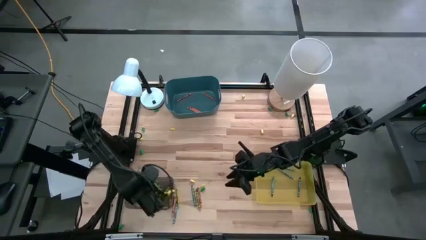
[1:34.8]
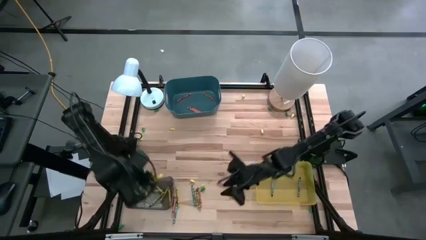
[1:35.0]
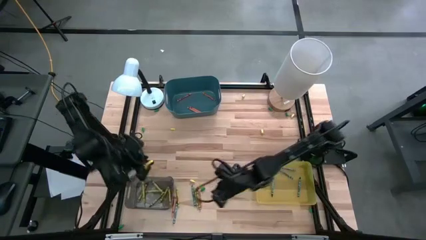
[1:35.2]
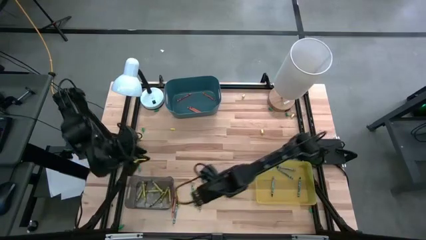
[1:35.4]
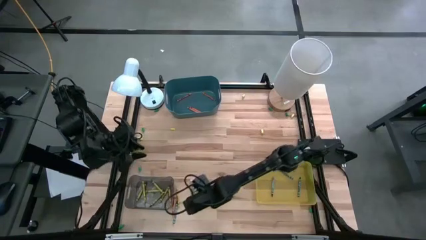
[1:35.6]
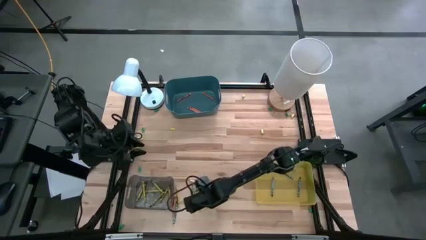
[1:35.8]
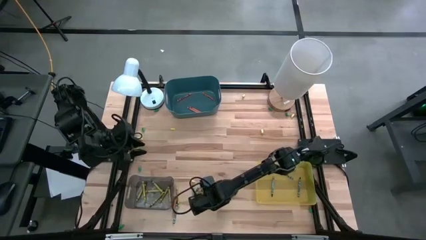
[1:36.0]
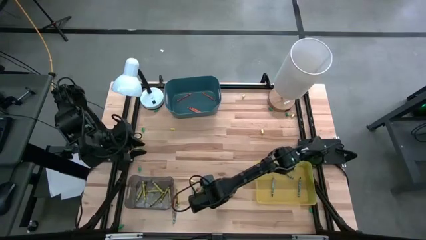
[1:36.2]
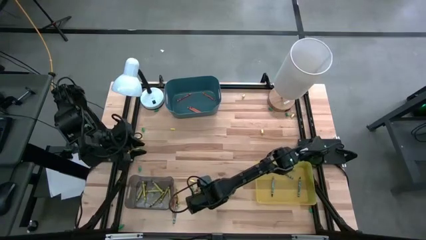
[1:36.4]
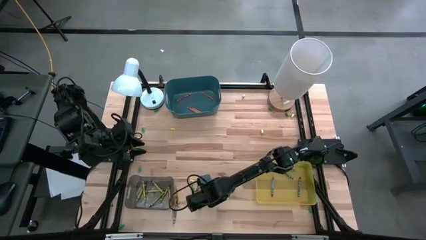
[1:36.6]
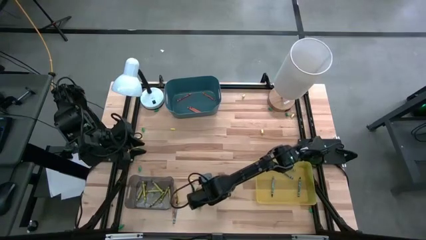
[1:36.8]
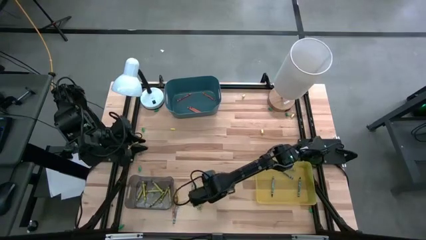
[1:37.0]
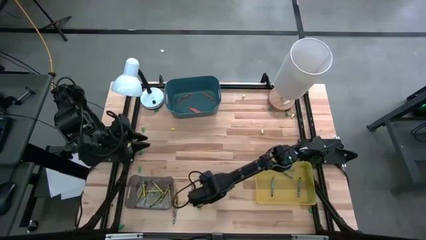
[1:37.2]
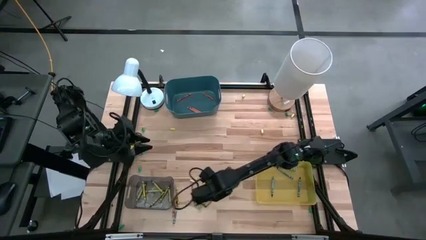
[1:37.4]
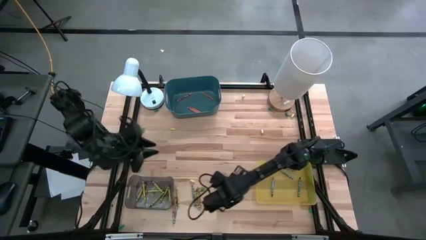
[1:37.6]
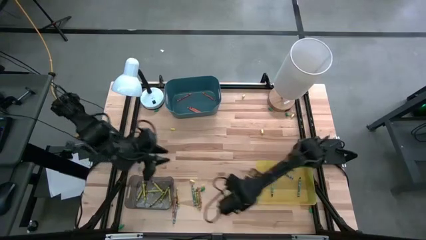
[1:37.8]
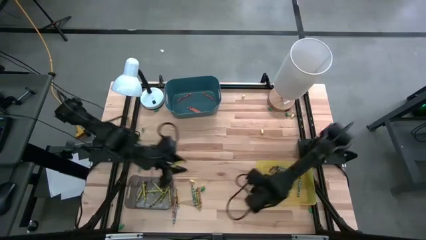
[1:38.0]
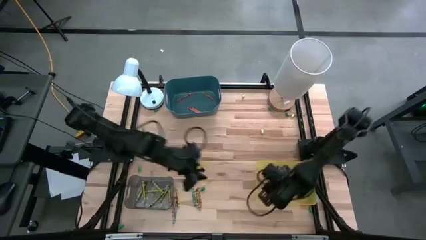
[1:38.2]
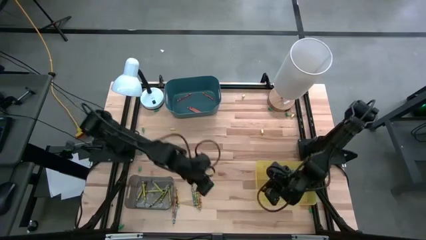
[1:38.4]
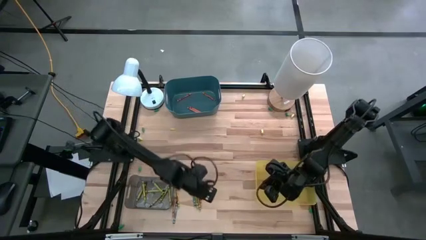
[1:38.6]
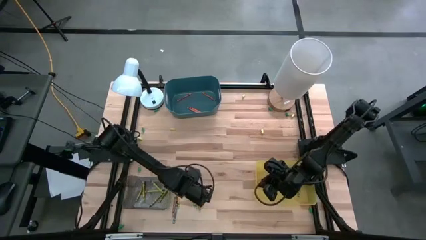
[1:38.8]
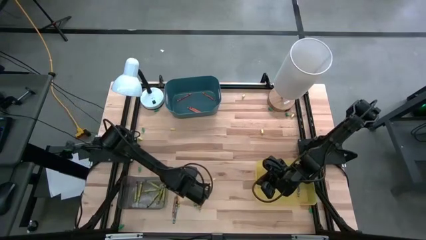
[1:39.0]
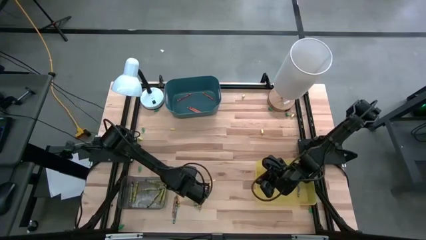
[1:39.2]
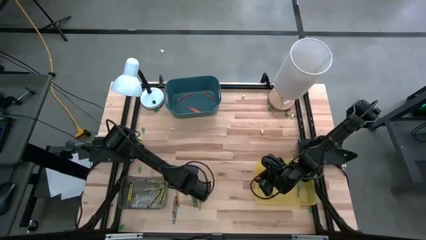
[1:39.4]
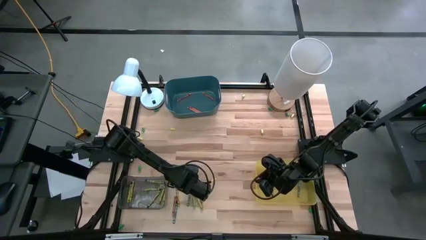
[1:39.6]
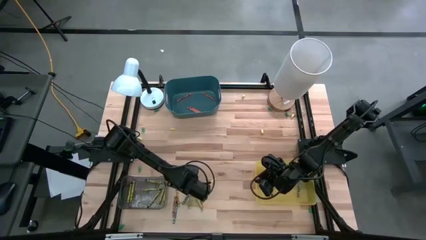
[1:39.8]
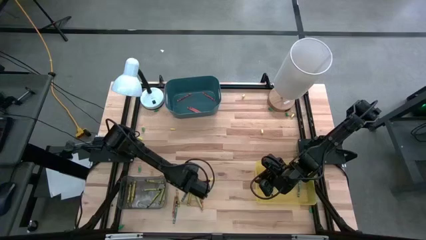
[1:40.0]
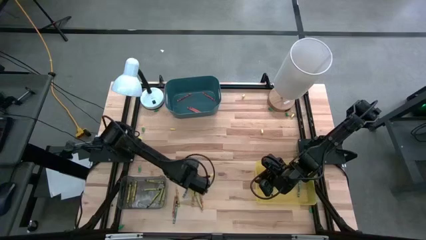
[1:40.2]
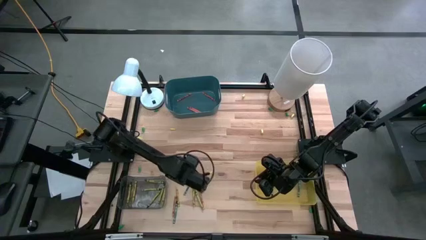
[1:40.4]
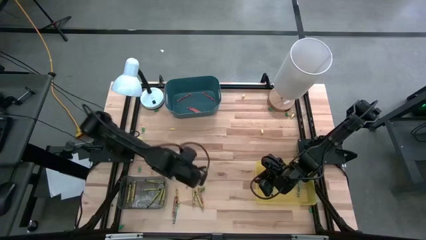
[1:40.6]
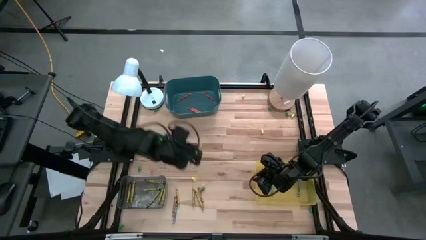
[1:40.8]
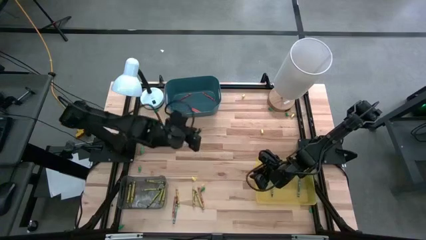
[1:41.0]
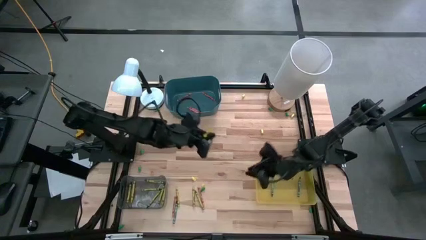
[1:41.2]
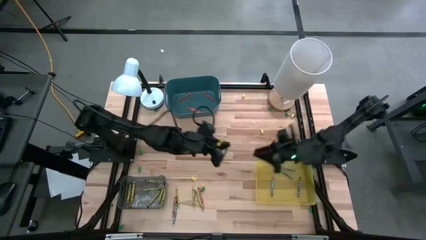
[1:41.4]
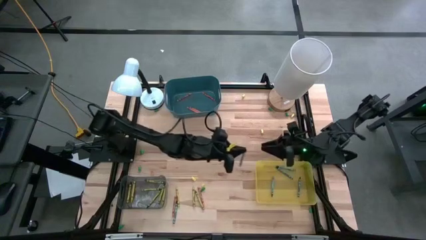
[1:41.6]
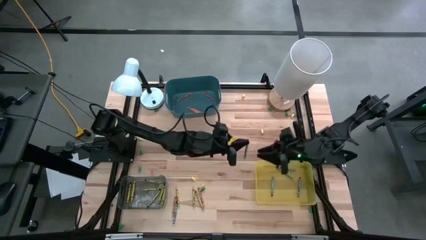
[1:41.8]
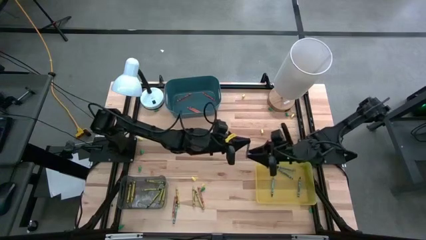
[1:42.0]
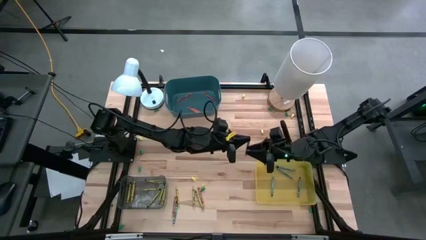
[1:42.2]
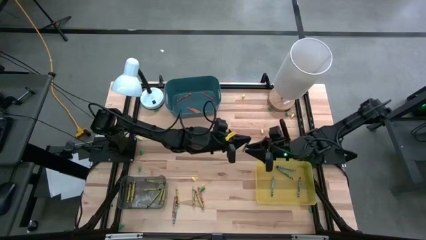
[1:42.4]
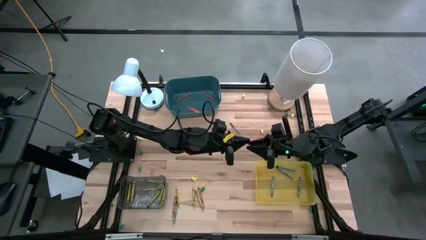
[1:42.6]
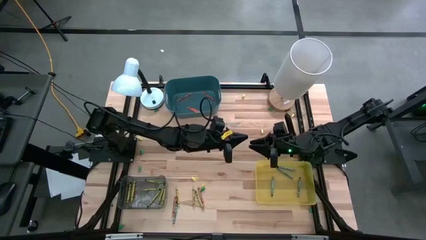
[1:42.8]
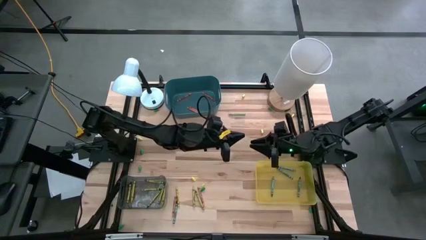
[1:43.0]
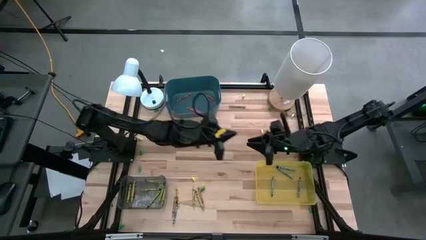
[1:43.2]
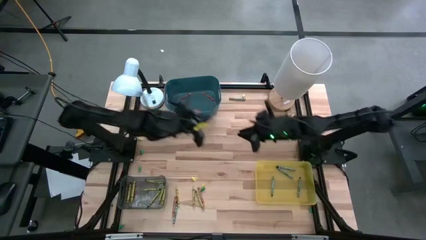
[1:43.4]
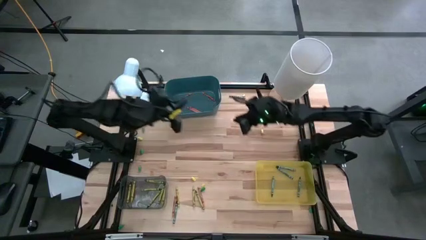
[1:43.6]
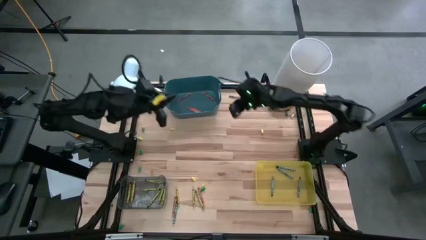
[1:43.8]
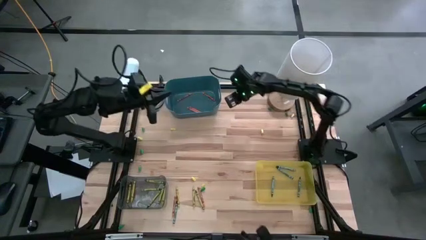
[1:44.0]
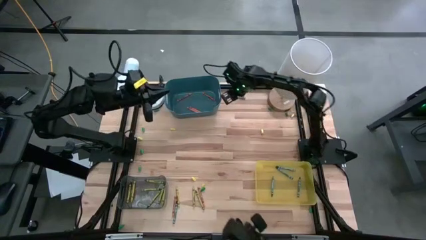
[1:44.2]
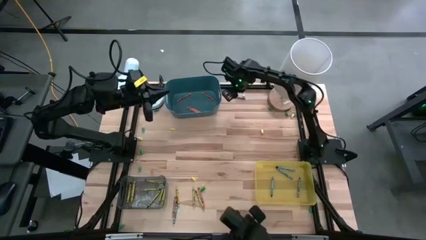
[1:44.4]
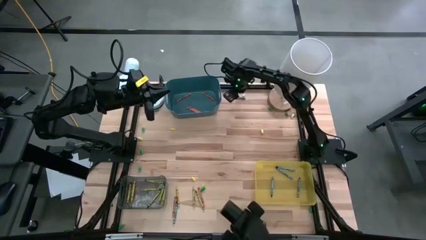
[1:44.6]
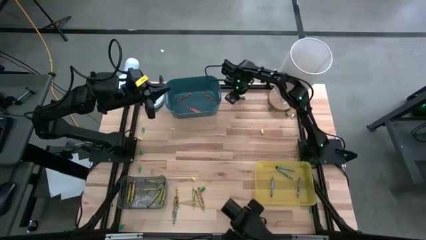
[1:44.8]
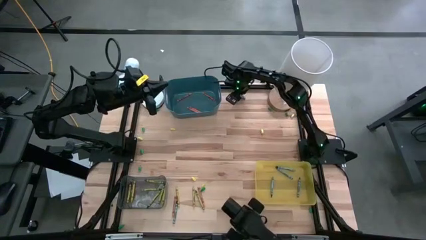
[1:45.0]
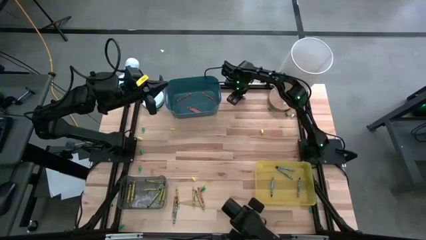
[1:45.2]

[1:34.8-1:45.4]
Task: Sort crayons
Put the right blue crayon into the yellow bin

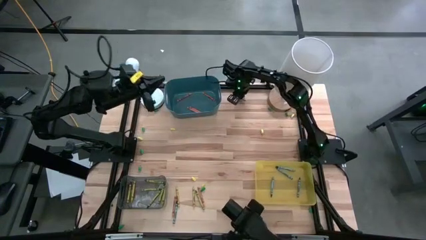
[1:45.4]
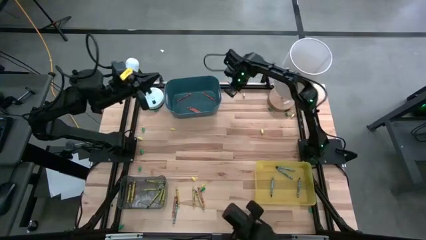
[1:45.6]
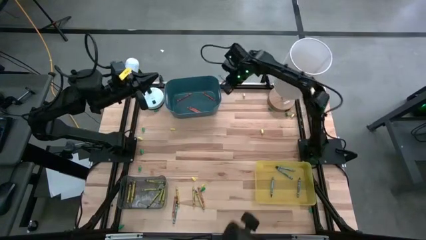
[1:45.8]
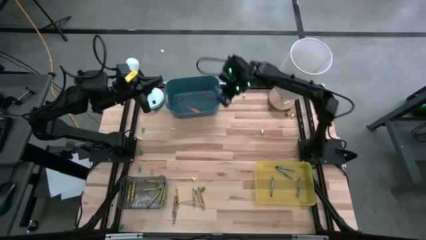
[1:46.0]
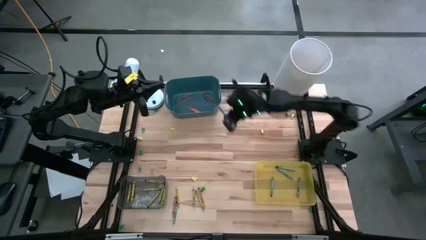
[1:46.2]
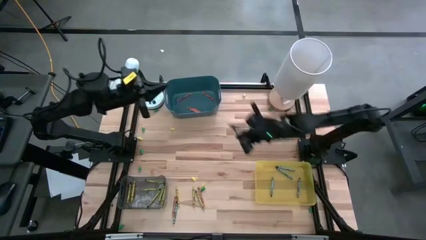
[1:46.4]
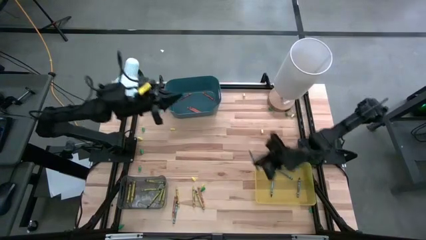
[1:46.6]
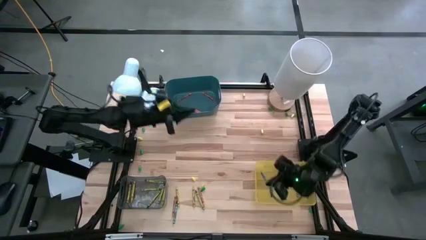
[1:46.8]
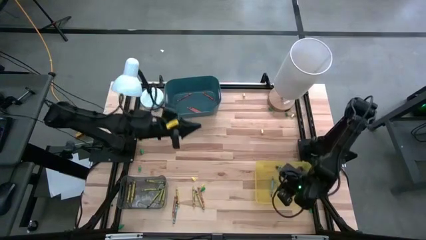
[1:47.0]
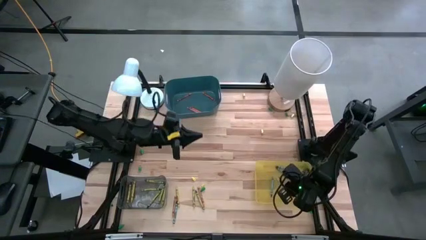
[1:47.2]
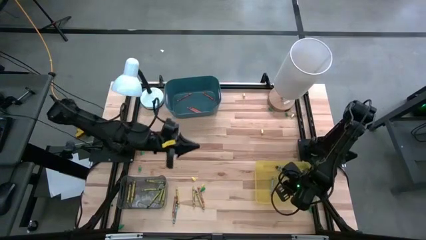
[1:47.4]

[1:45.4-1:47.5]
Put the right blue crayon into the yellow bin

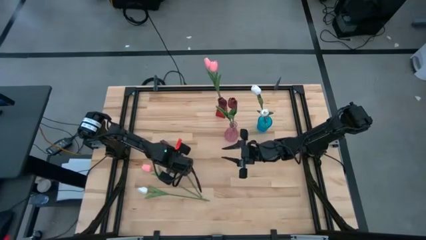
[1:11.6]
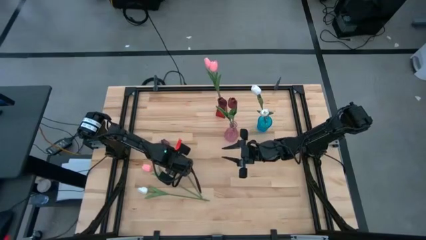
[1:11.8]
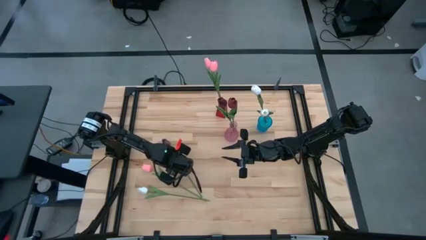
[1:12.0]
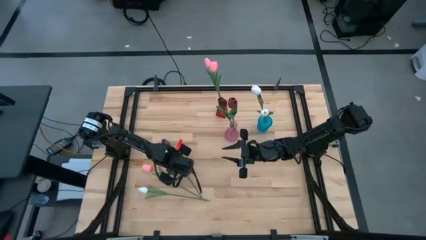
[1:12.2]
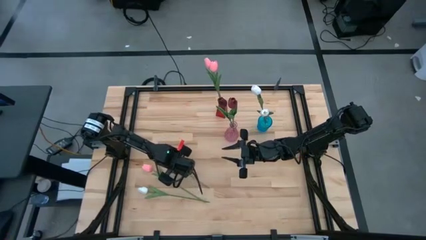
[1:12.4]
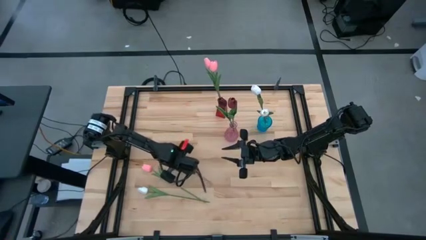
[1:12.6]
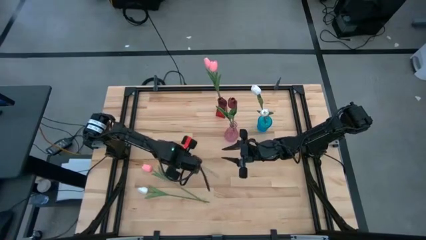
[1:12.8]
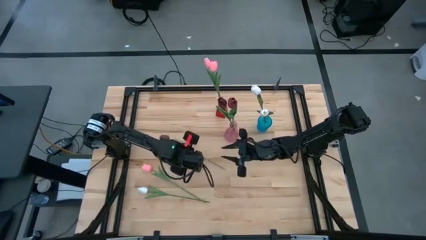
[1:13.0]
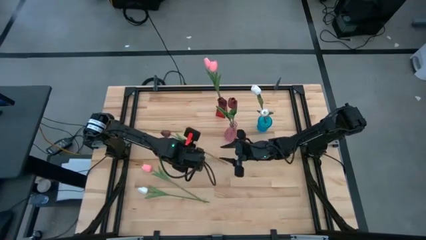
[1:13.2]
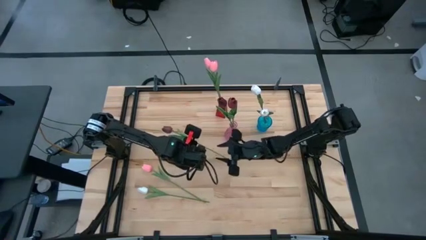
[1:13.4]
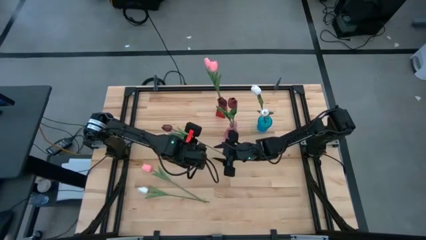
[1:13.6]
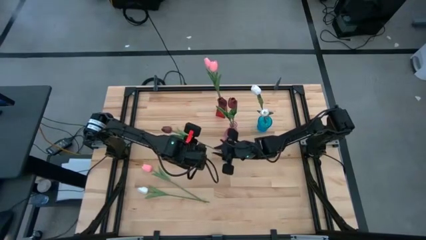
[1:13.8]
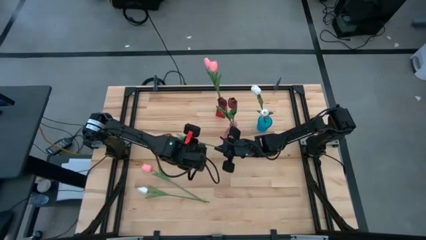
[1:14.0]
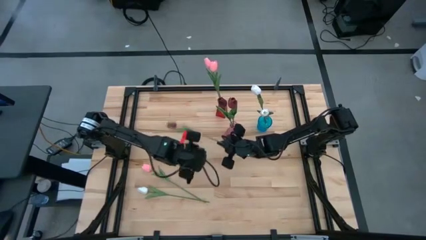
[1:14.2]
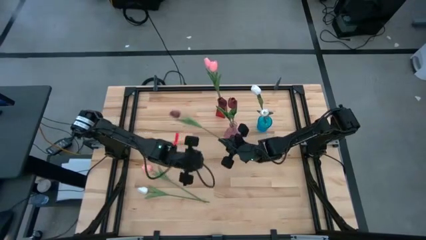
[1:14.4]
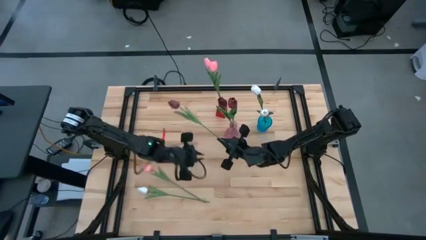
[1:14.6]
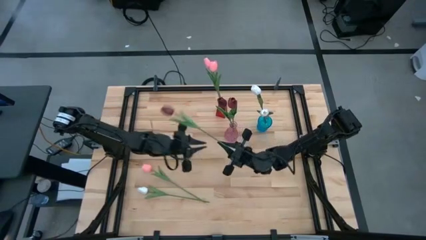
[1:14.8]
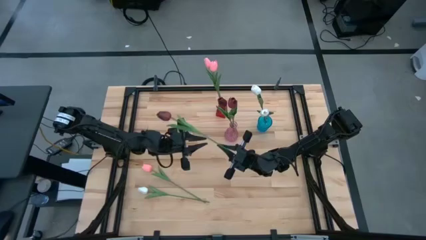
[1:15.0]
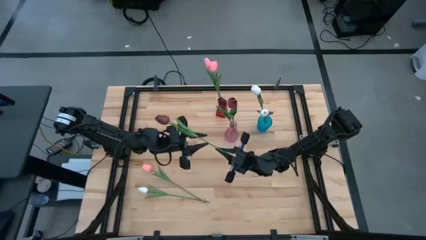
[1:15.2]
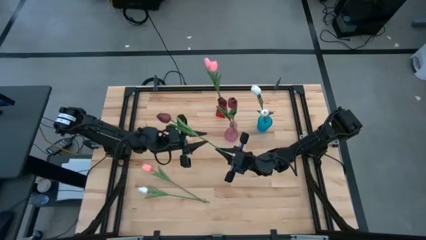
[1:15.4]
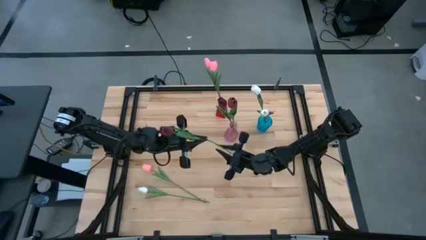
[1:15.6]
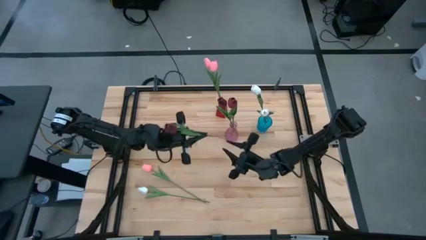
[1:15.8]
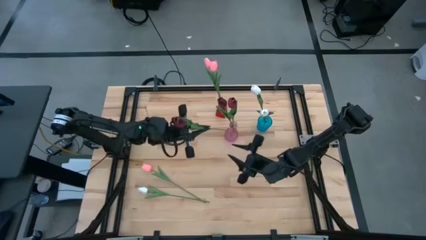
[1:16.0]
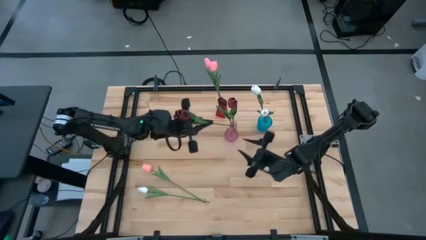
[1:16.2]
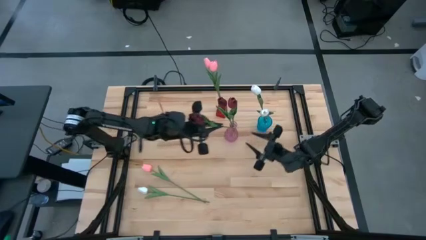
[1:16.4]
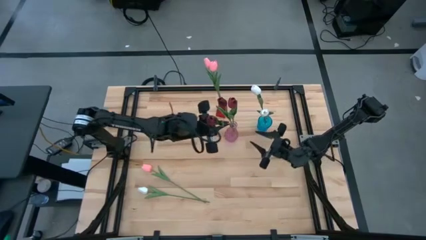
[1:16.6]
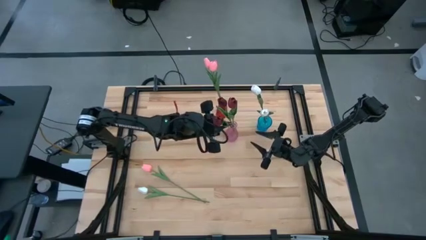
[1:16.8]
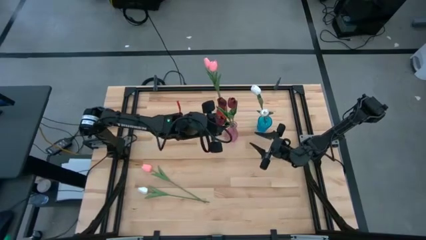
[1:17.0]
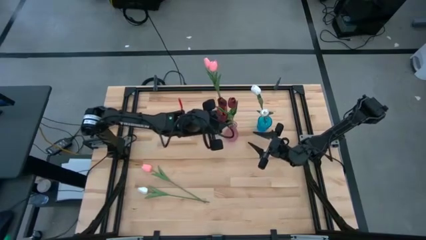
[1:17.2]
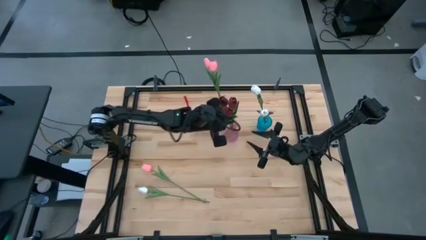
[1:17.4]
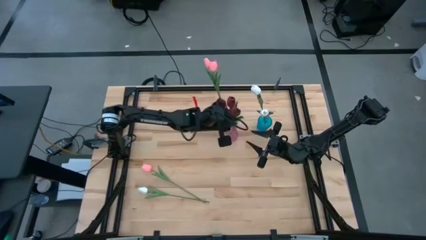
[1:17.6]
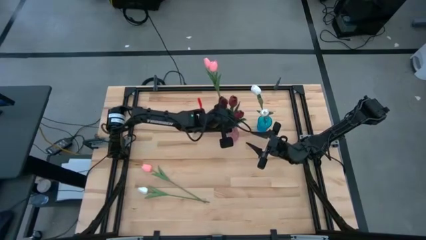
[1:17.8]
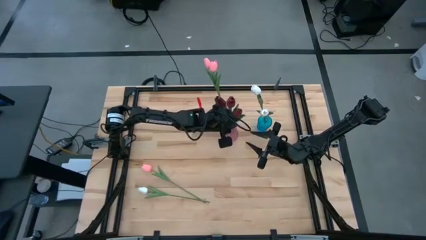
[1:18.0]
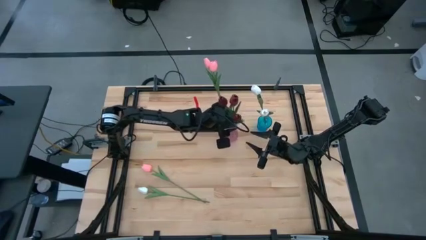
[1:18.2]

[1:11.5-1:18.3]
Task: Sort flowers into vase by color
Put the red flower into the pink vase
